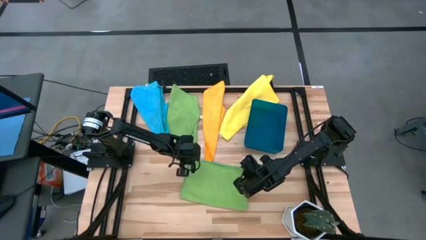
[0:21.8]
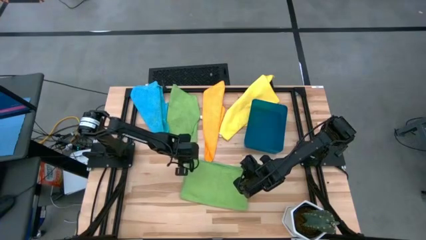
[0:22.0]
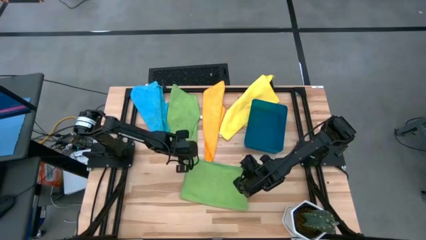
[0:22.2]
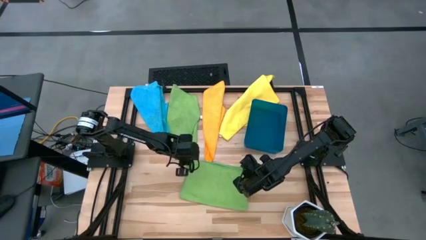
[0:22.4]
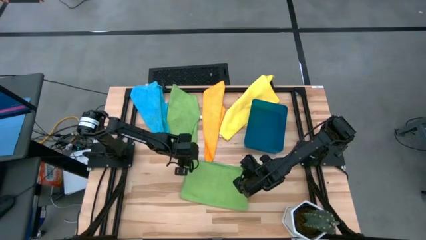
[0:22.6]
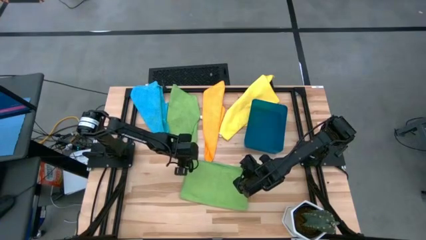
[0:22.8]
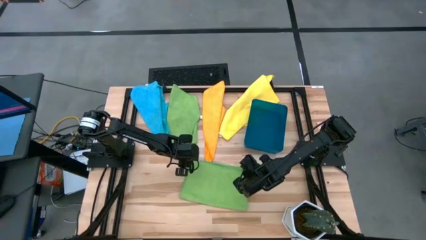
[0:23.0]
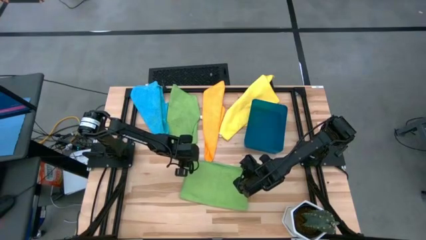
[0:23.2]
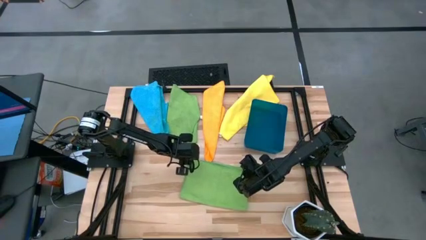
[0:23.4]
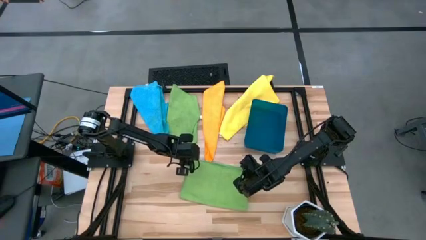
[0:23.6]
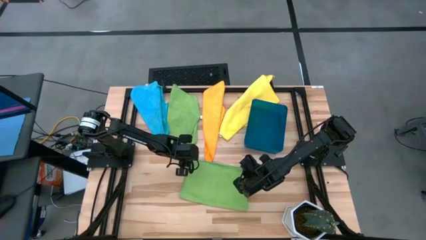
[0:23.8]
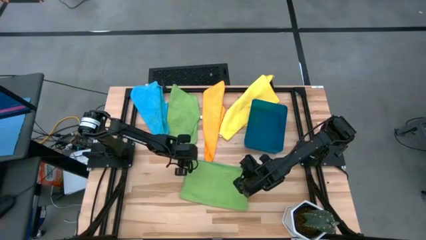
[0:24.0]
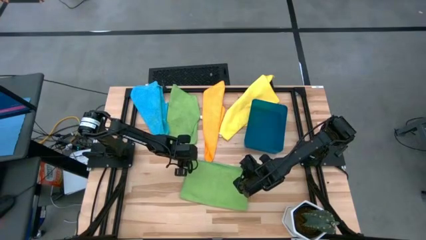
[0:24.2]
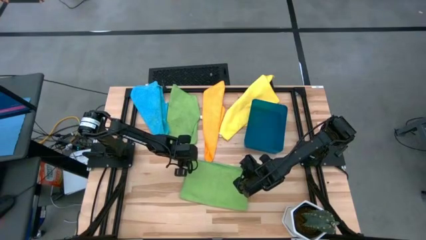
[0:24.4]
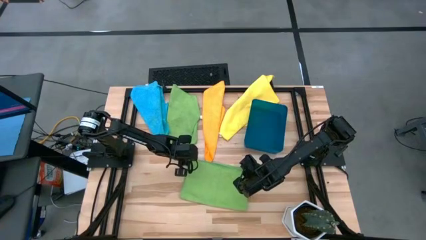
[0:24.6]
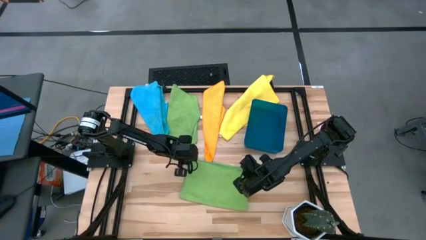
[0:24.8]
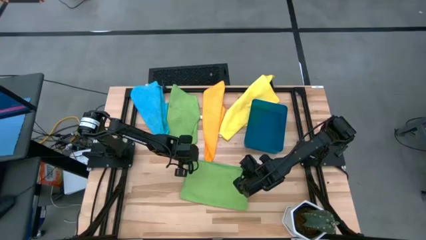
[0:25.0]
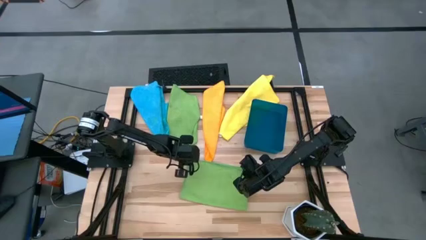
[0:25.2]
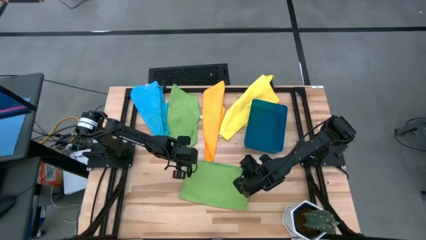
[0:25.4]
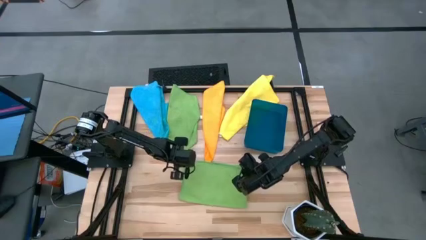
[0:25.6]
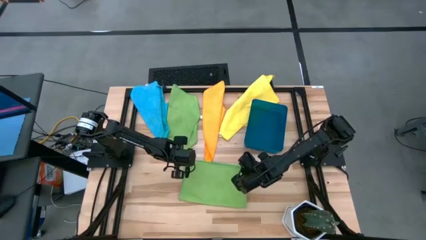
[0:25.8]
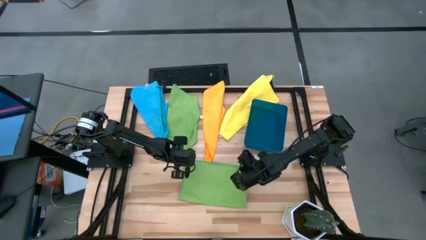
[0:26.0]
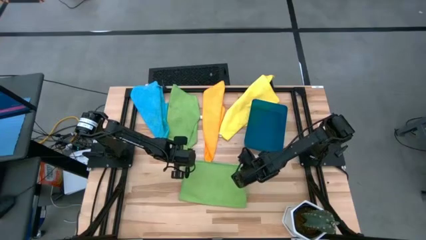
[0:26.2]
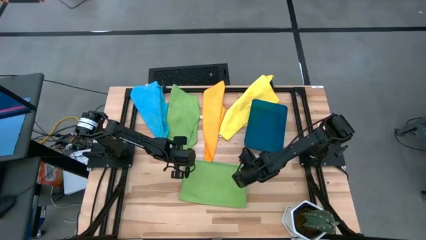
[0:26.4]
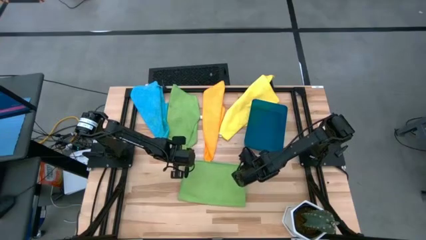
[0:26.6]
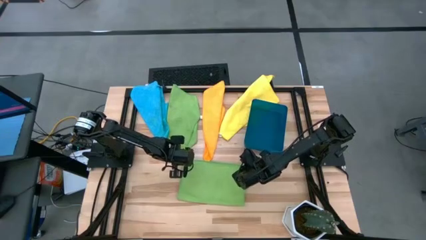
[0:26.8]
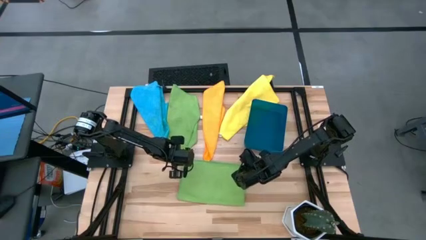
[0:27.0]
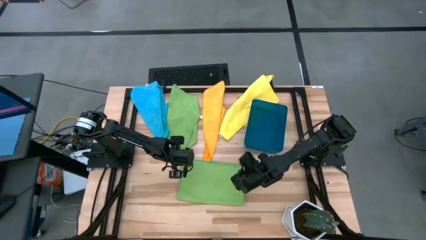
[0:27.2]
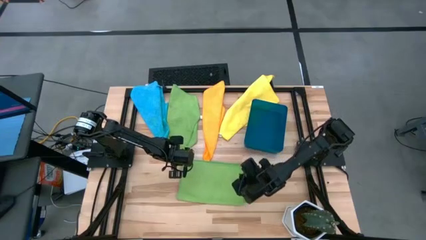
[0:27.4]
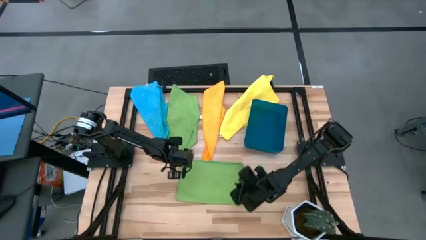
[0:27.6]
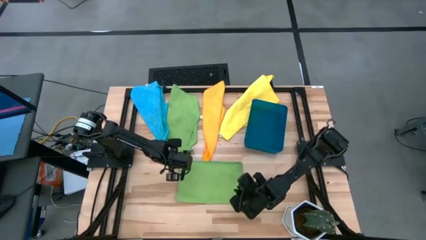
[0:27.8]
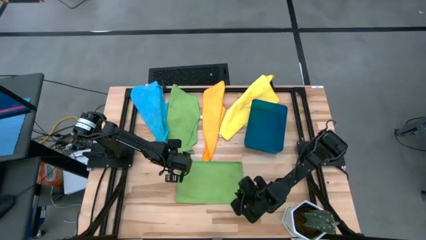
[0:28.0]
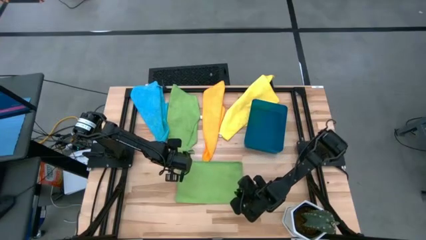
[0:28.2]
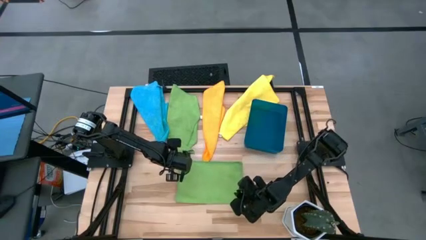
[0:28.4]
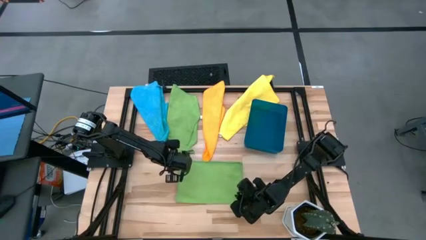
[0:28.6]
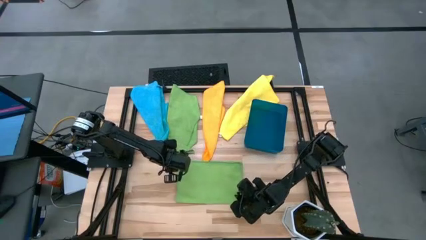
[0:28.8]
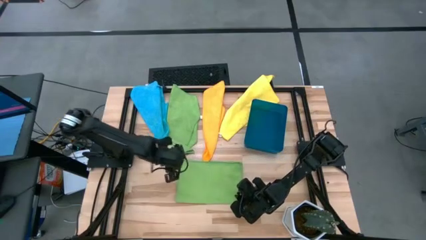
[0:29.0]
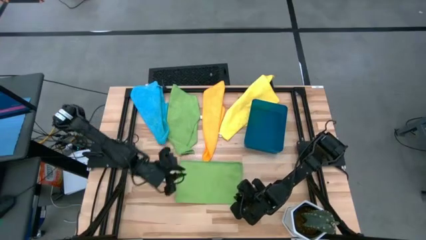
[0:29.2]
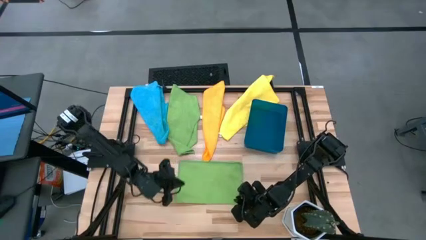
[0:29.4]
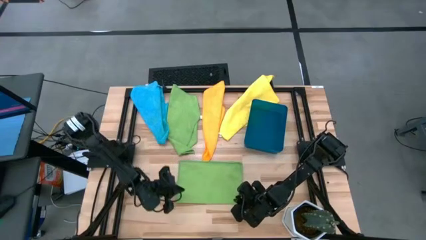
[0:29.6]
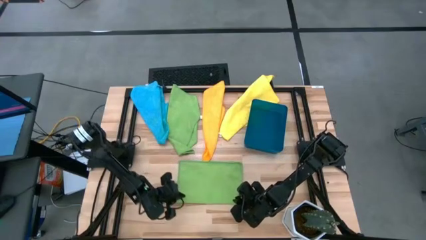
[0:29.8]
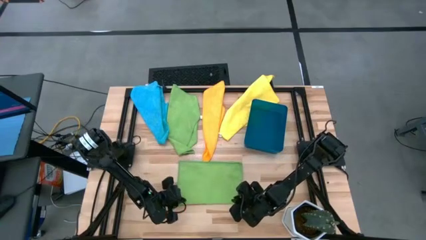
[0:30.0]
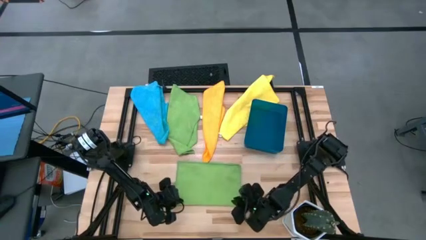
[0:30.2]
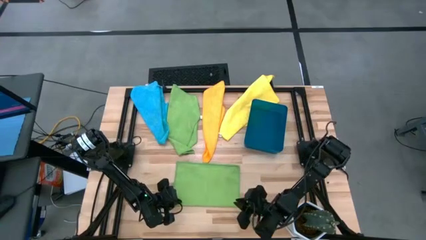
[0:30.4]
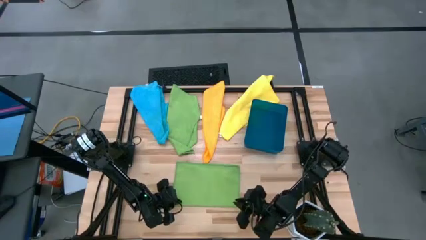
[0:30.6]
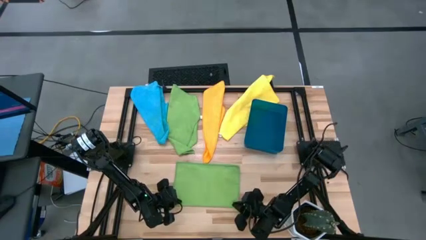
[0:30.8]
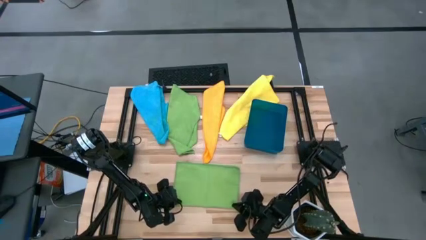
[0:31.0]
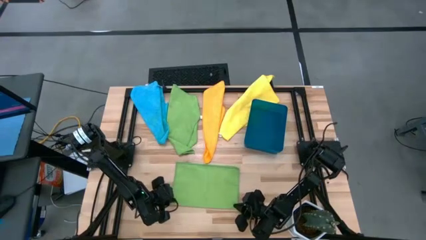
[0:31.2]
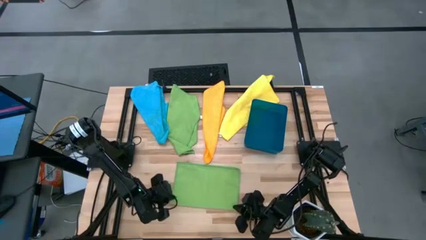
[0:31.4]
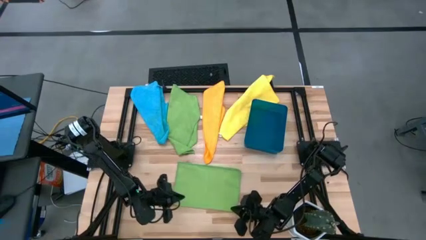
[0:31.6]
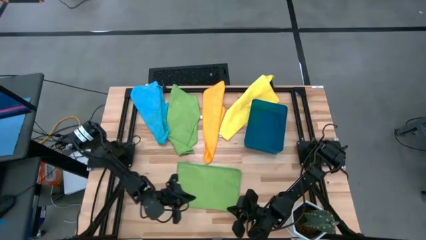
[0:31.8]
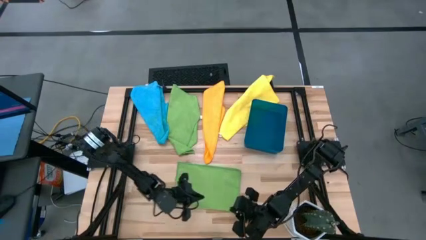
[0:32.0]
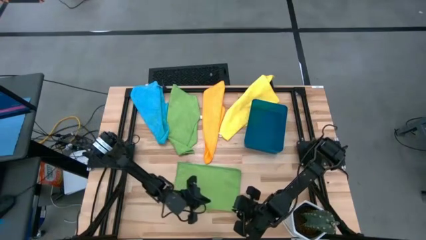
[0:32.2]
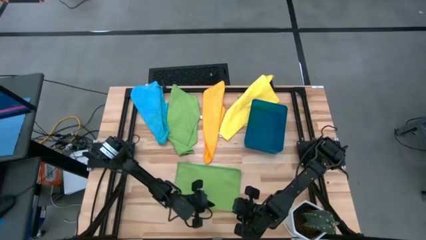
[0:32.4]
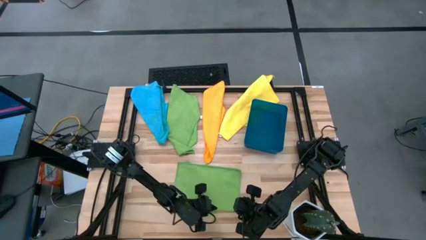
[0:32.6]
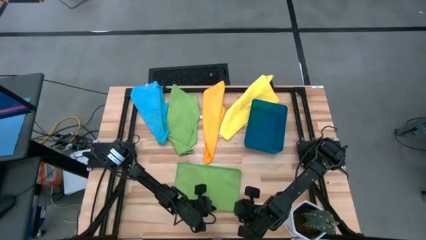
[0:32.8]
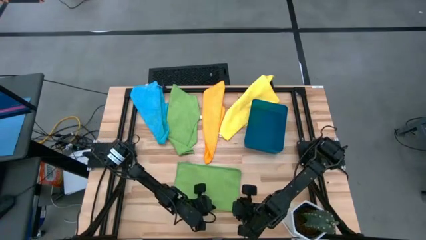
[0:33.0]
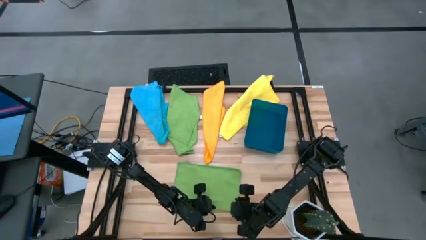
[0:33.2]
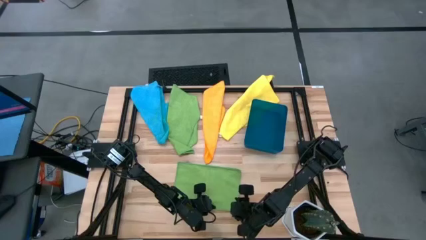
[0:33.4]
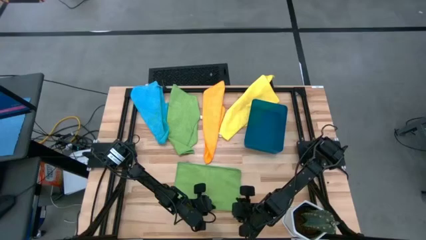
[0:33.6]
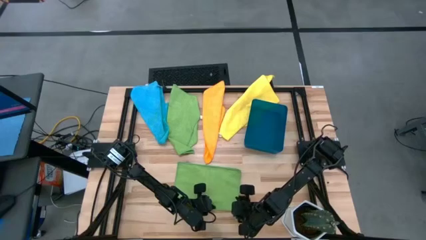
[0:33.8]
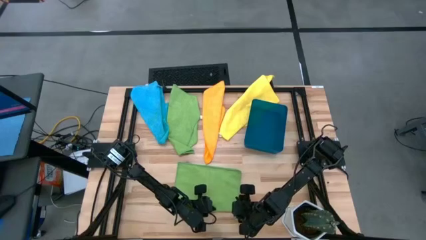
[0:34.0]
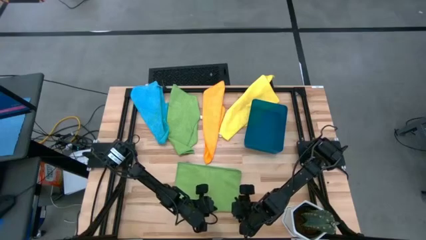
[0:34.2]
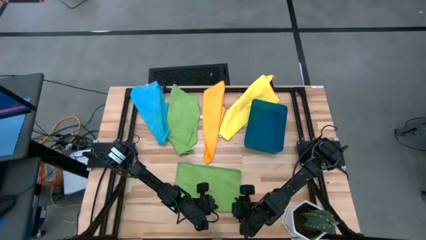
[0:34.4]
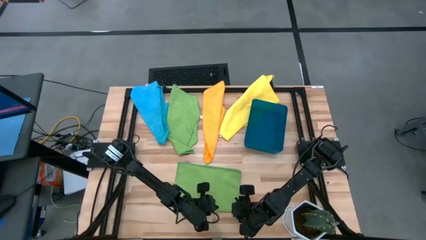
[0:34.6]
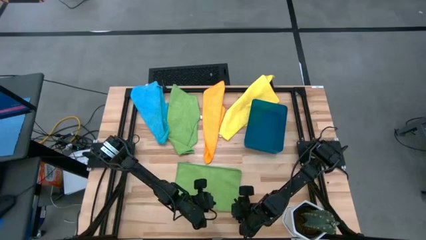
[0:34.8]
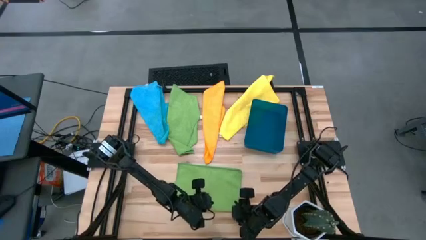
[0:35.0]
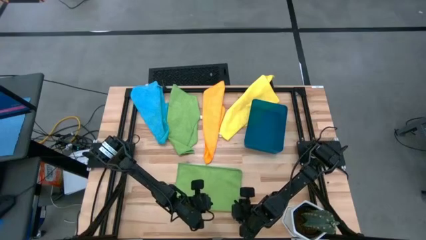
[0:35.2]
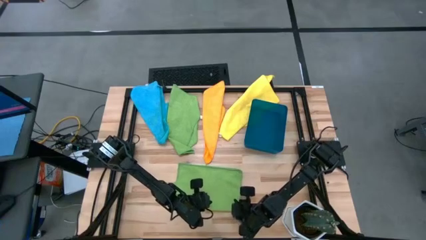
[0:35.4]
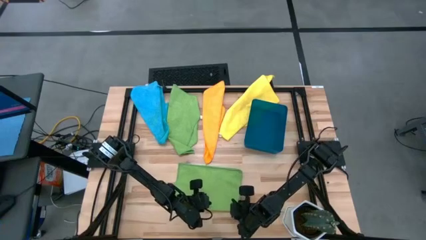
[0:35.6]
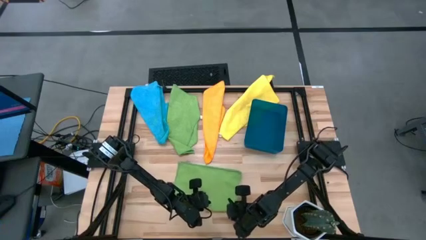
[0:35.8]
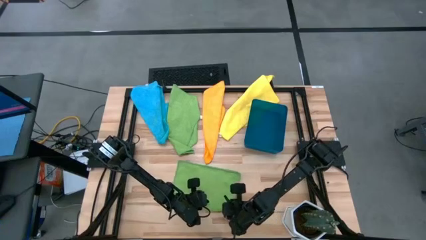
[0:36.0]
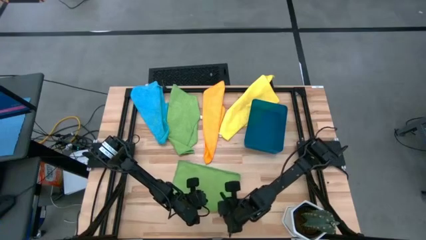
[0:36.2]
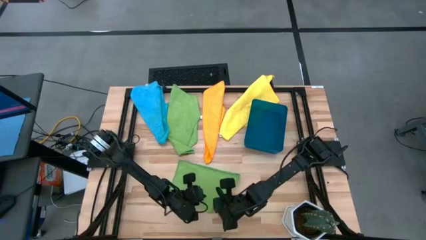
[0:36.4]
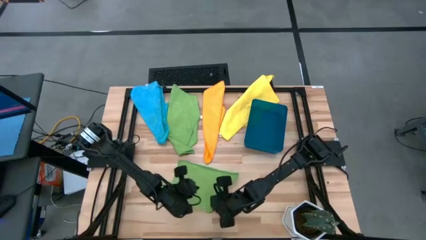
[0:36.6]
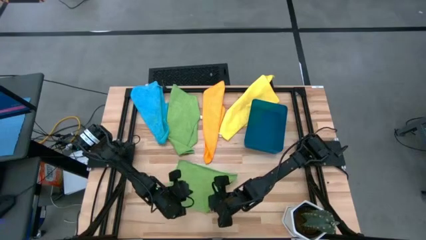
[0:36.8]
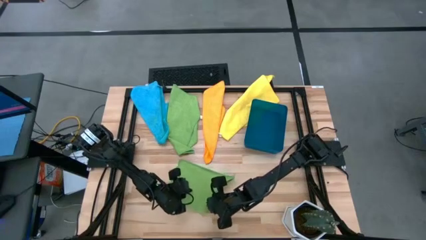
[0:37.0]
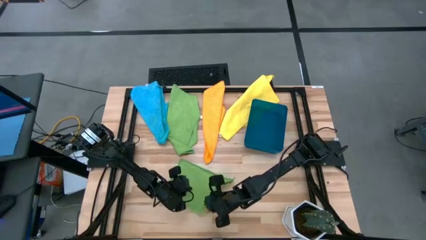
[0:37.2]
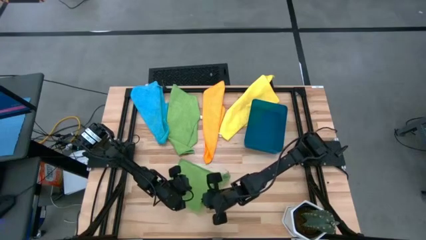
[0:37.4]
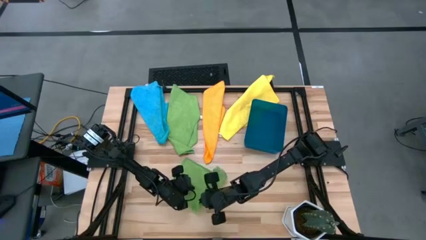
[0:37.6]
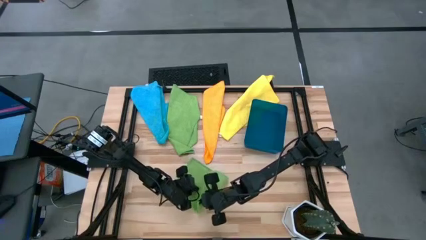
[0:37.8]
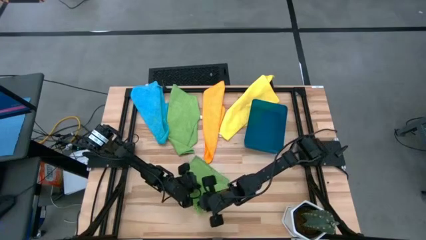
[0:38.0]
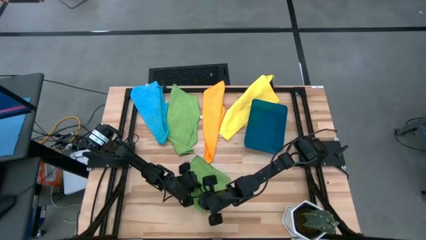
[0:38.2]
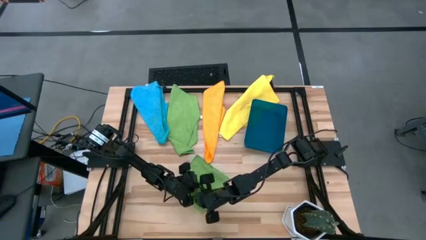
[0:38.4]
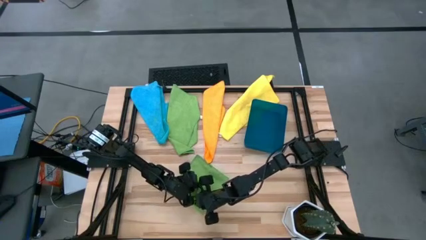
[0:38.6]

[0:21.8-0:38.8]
Task: Fold microfiber towels
Fold the bottom green microfiber cloth
